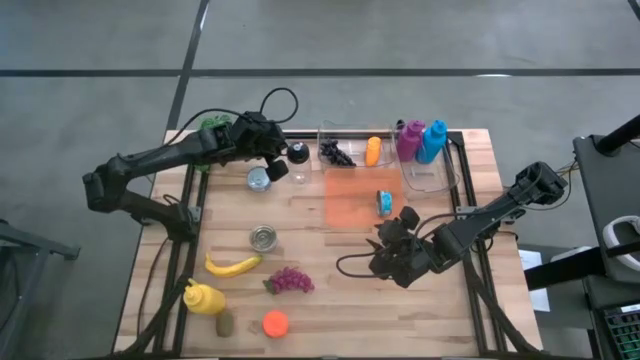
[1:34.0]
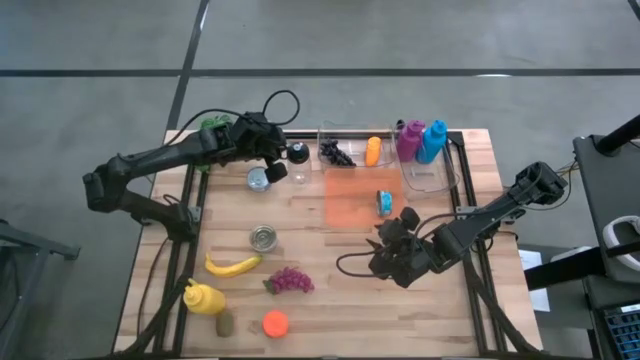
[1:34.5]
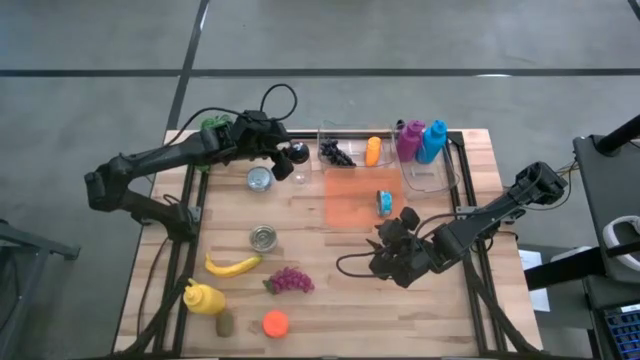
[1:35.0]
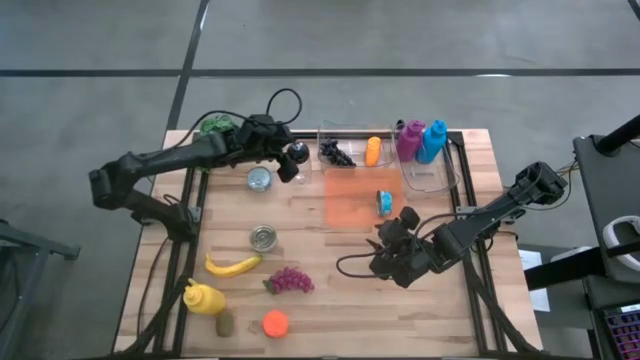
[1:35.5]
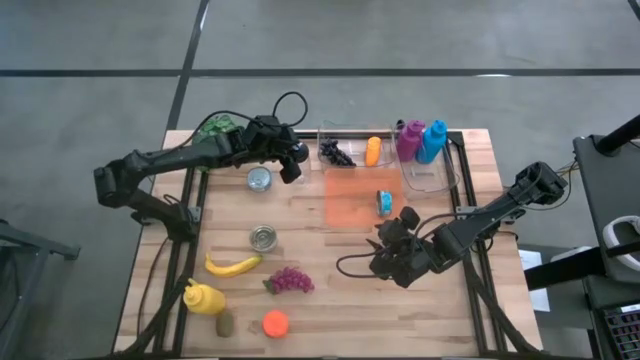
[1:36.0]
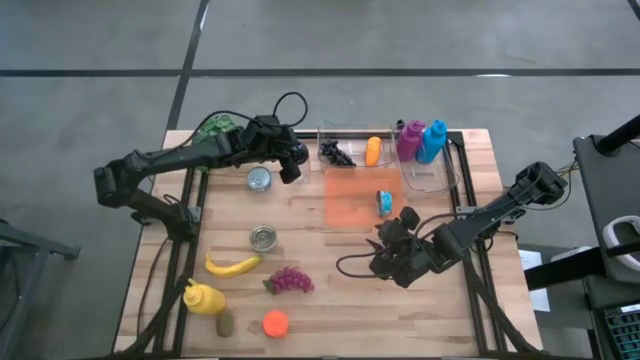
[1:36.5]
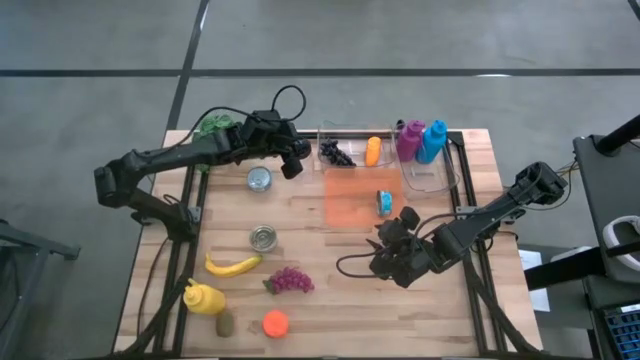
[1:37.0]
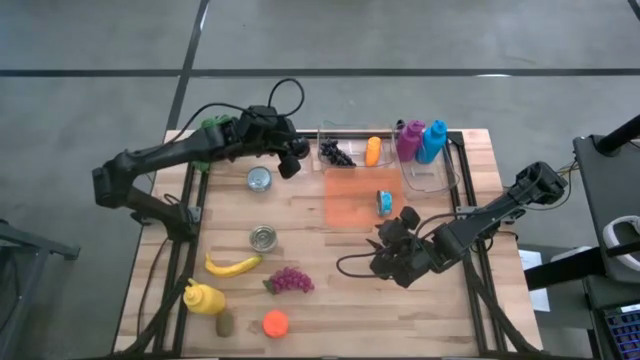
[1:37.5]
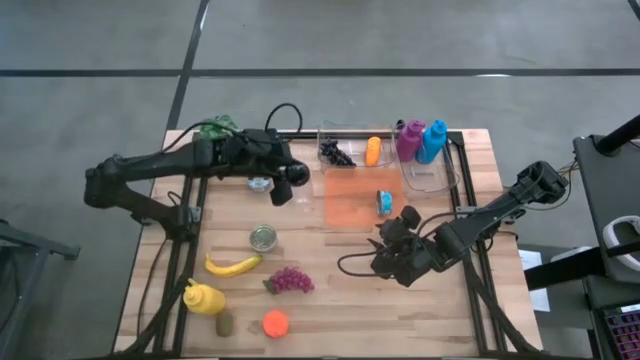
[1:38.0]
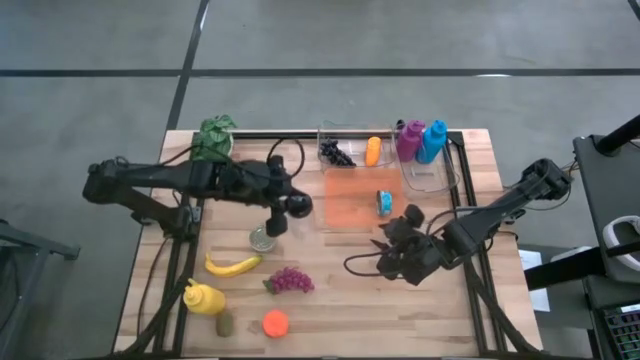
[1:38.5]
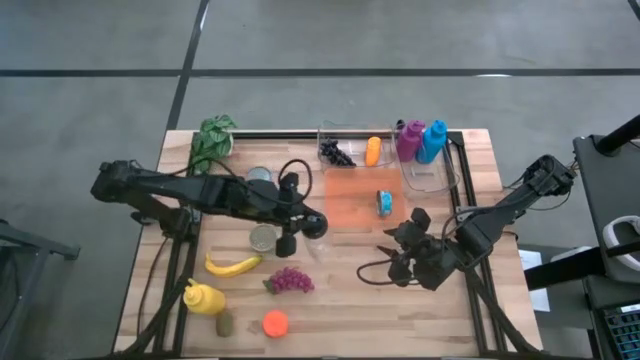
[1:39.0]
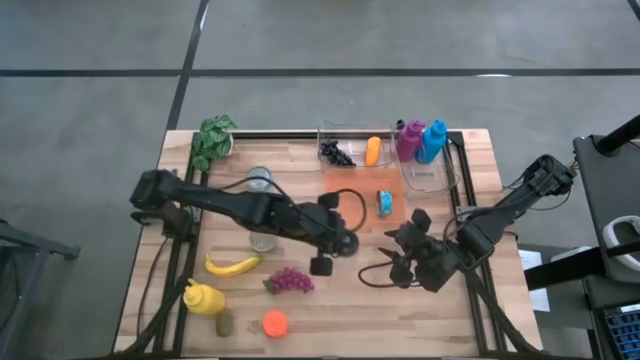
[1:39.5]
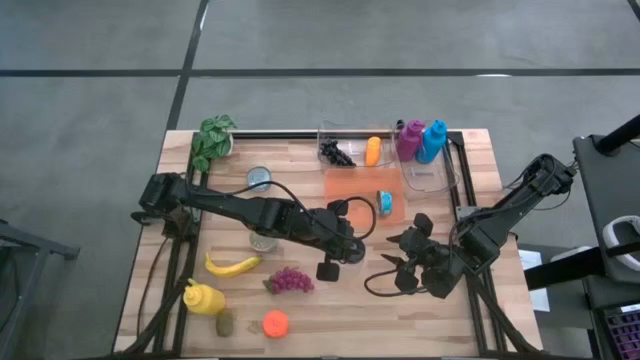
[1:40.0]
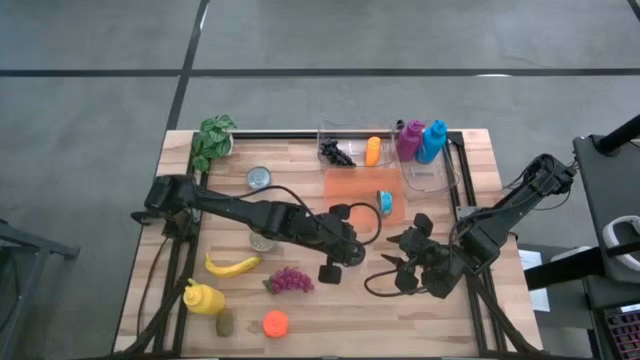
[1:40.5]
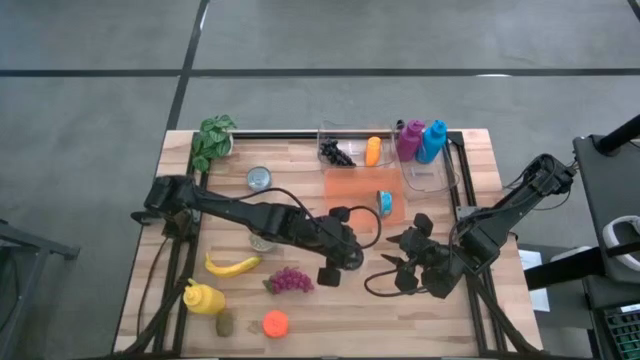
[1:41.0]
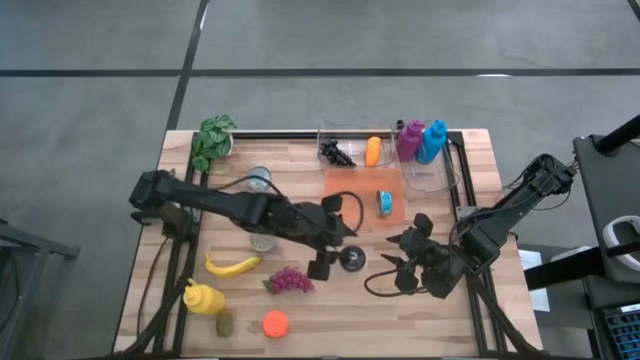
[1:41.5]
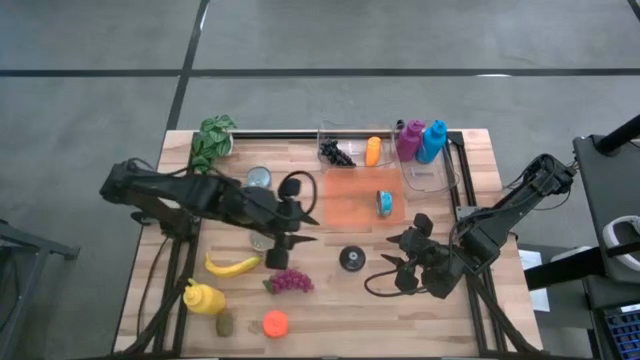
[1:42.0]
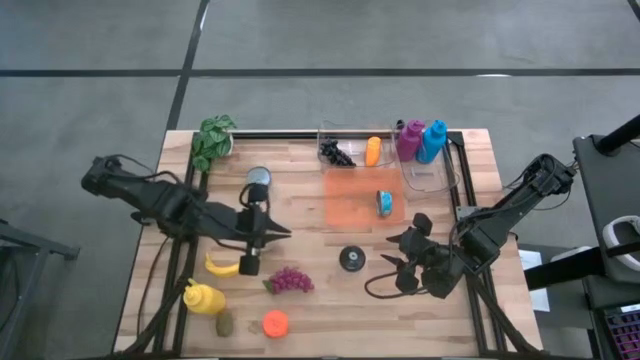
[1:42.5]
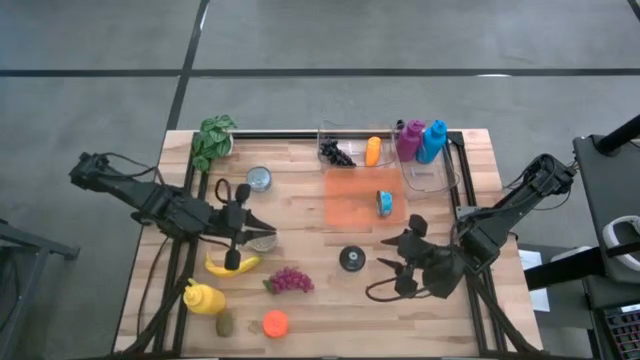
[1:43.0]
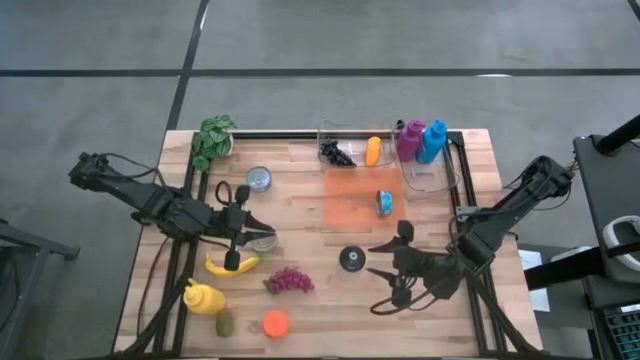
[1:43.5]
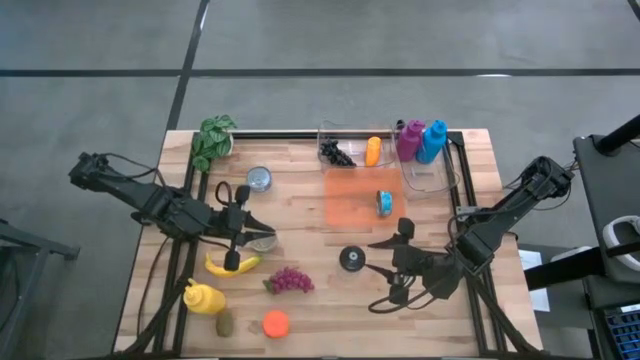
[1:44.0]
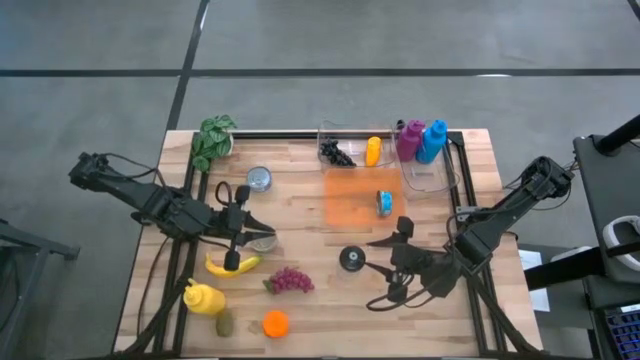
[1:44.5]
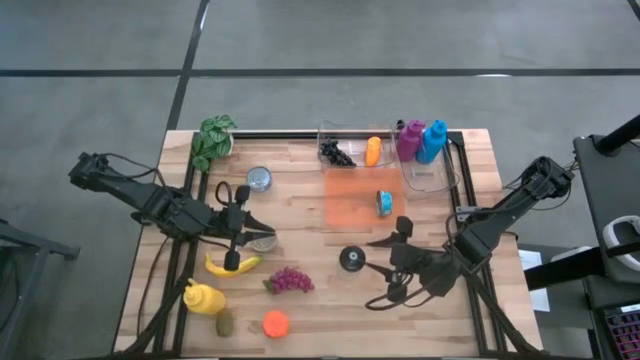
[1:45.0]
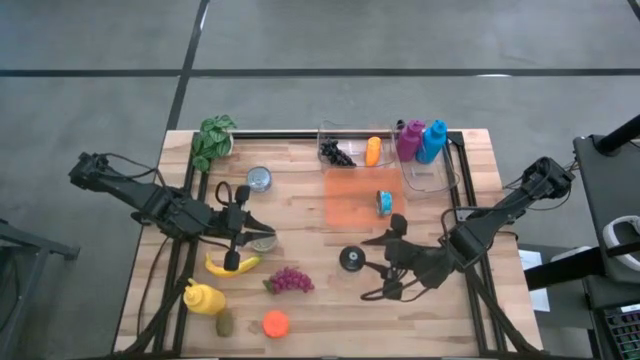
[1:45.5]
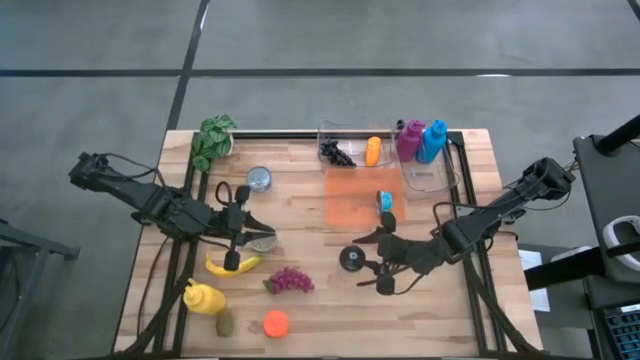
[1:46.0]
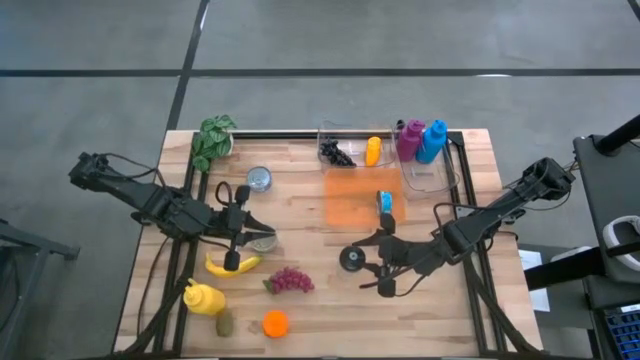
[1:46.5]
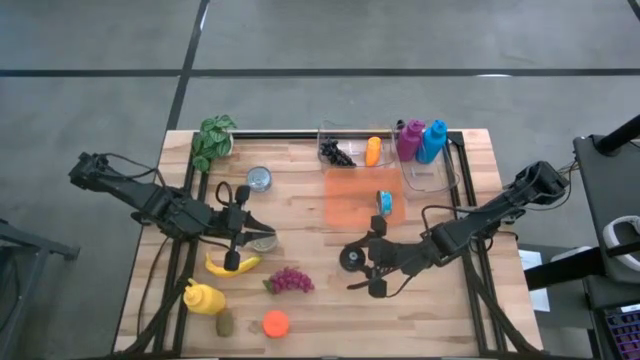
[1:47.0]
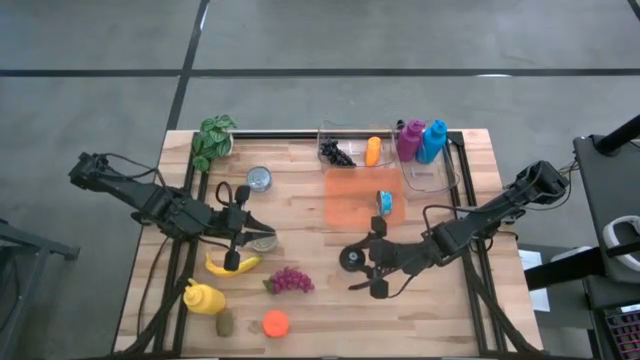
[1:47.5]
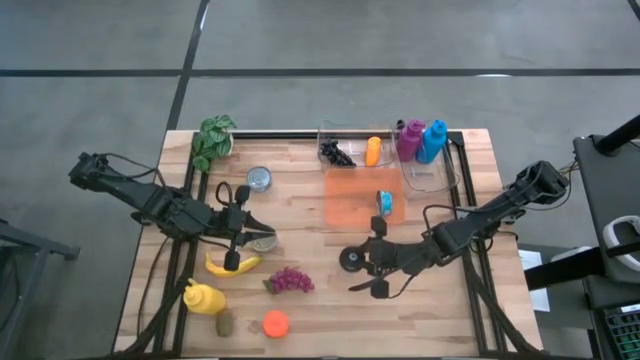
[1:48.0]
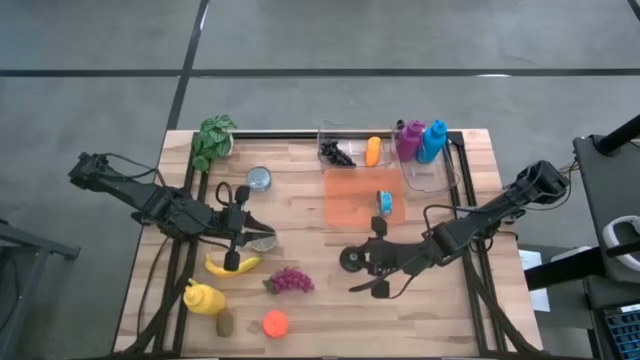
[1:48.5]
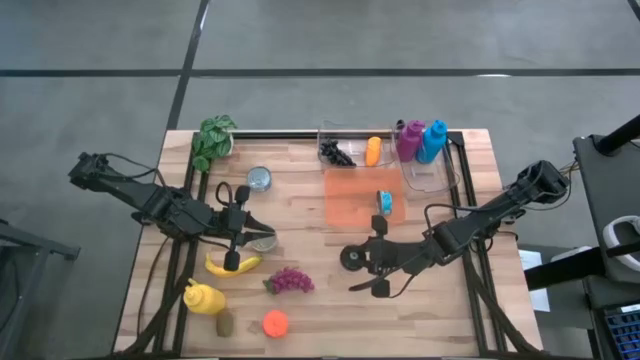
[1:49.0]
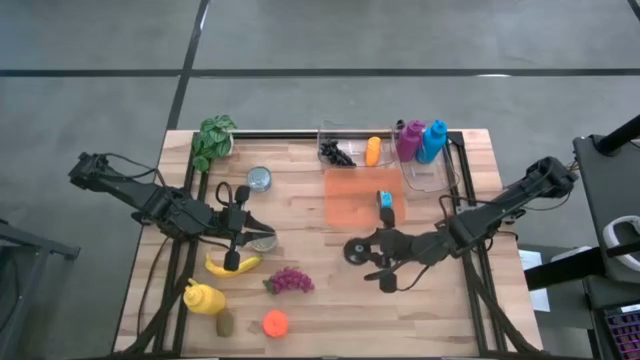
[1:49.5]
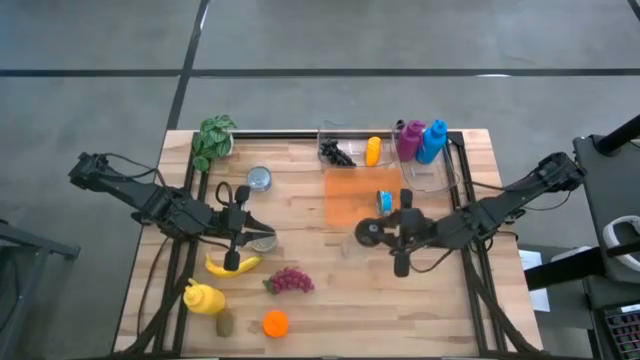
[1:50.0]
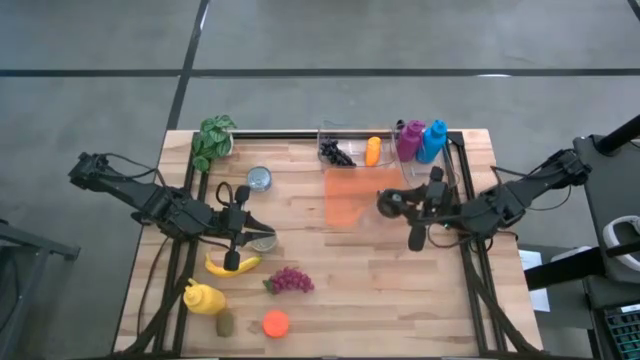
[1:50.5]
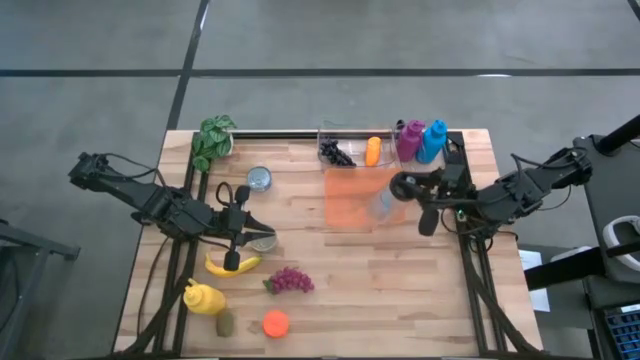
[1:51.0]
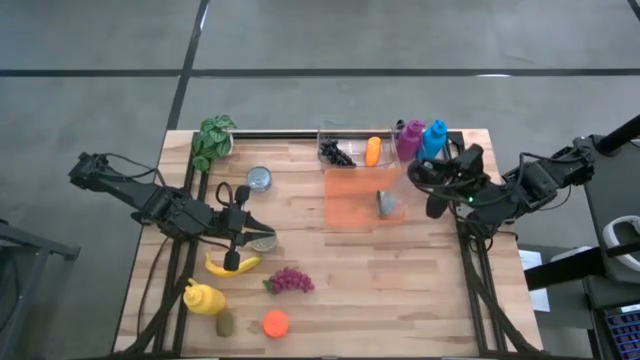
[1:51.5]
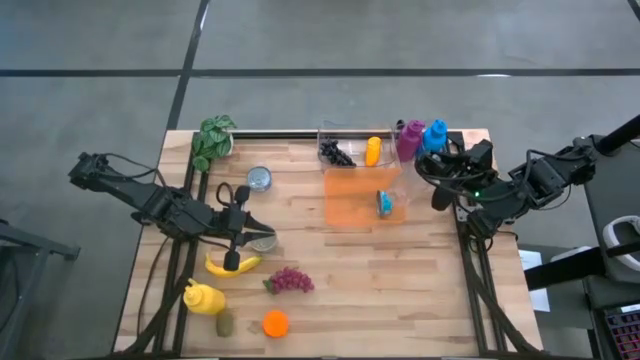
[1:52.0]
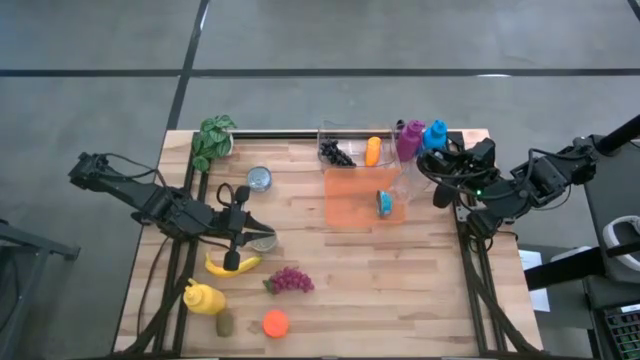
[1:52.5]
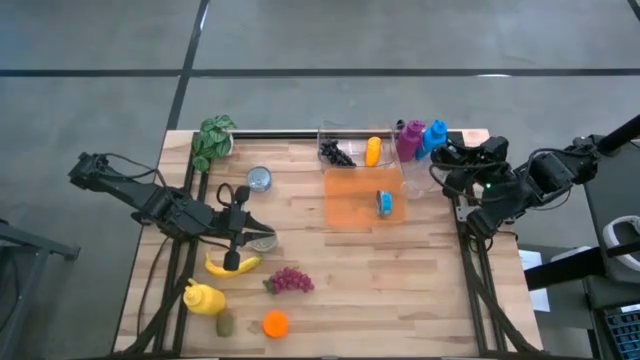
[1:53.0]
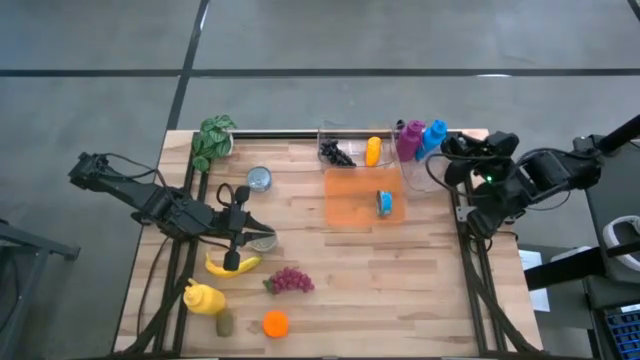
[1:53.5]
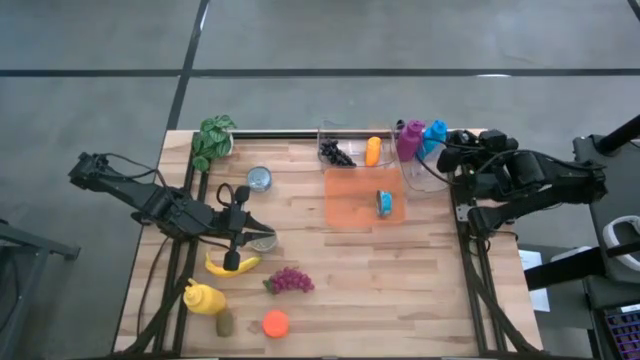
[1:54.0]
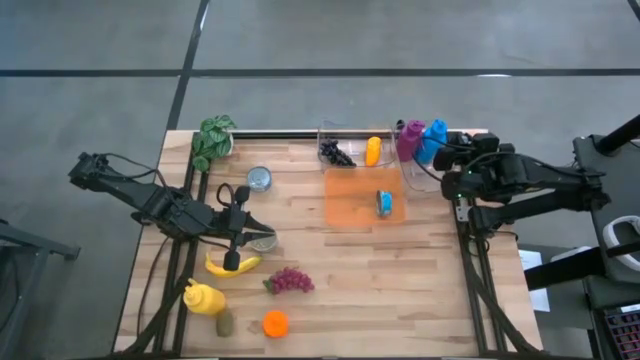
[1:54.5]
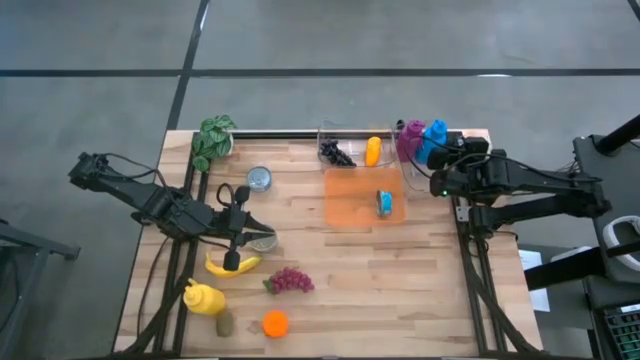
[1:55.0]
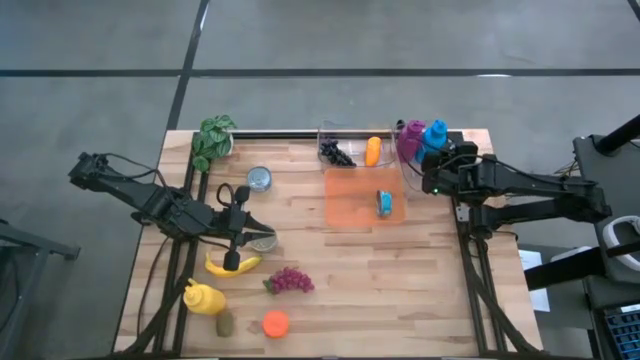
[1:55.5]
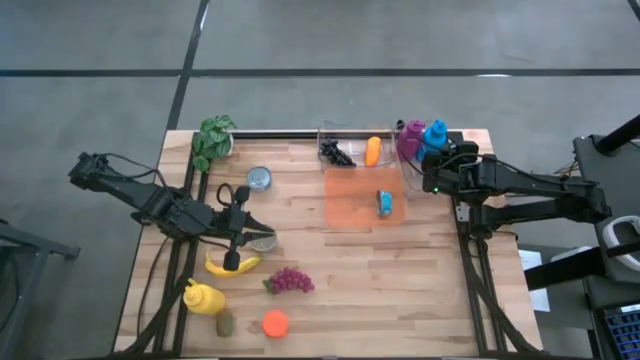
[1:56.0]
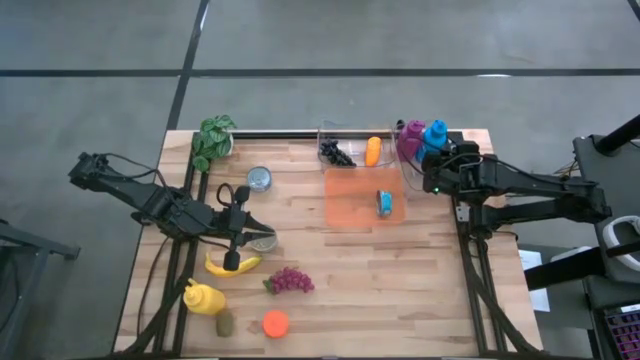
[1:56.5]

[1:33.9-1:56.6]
Task: Pick & Place Food Item
Put the transparent water bottle into the right transparent bin
